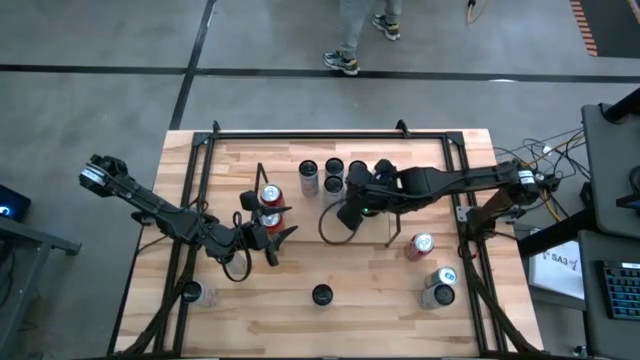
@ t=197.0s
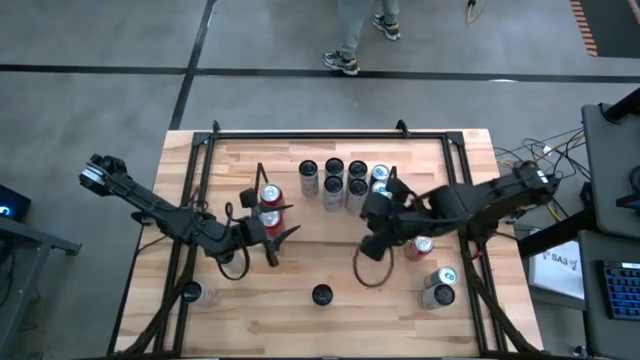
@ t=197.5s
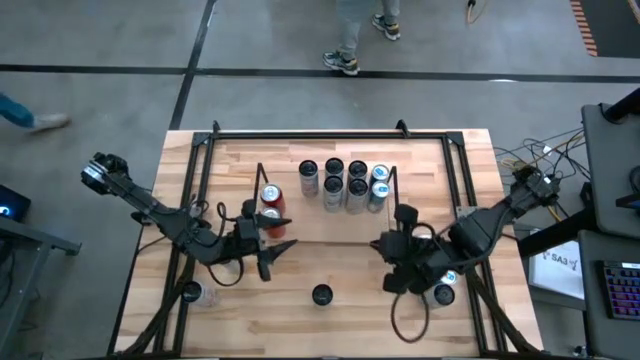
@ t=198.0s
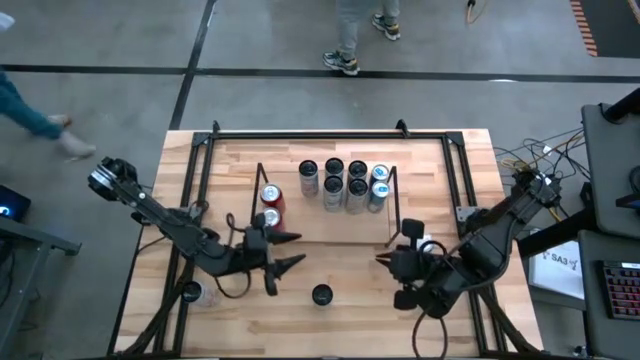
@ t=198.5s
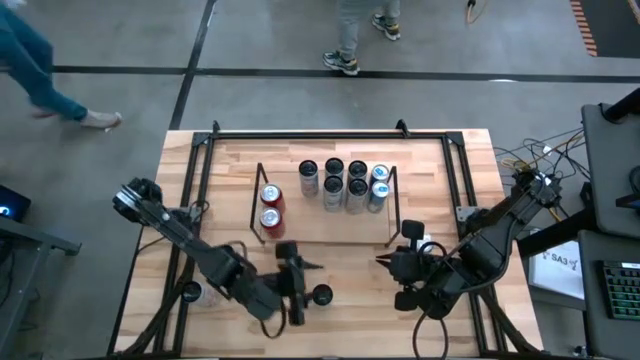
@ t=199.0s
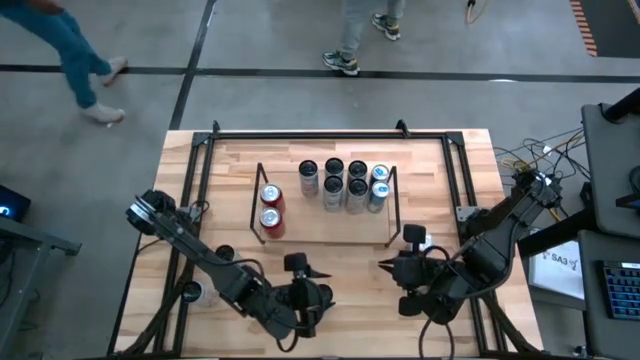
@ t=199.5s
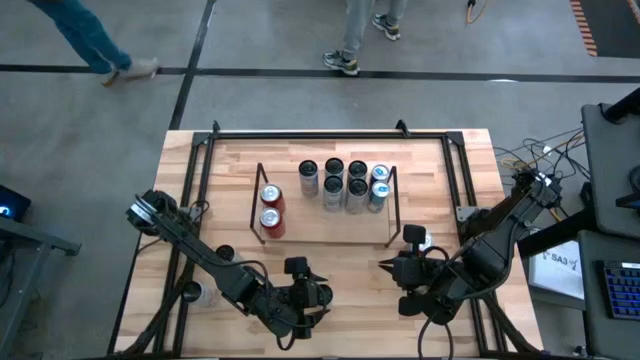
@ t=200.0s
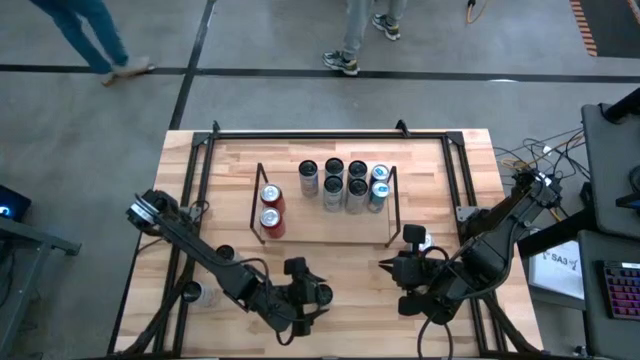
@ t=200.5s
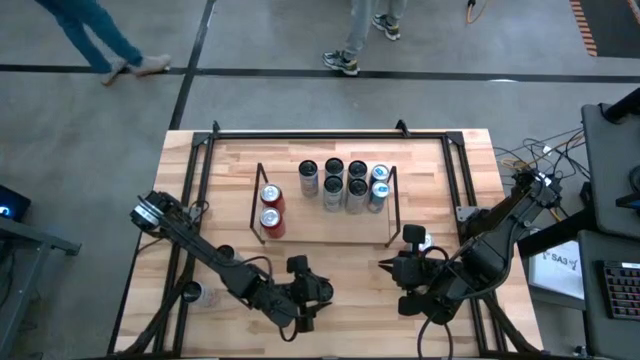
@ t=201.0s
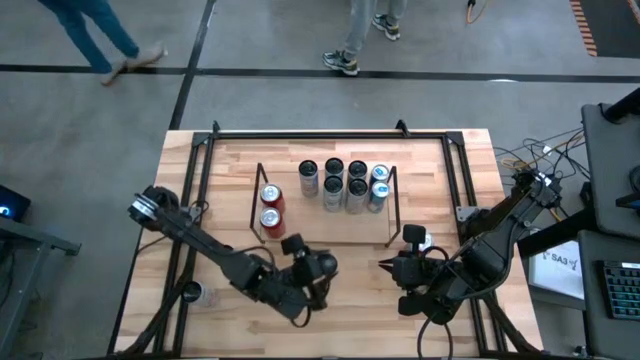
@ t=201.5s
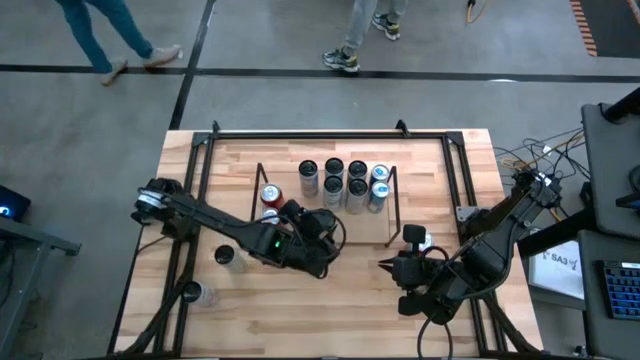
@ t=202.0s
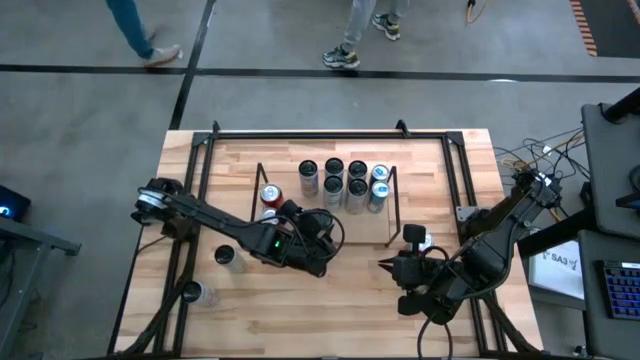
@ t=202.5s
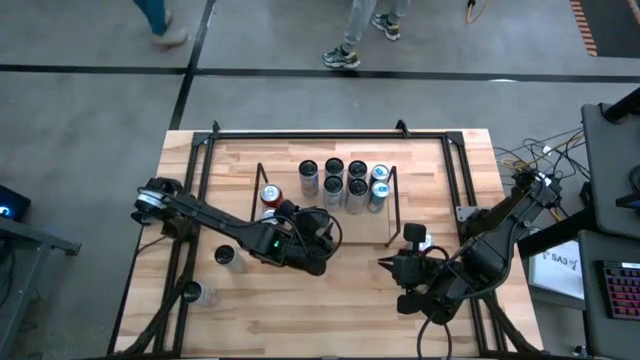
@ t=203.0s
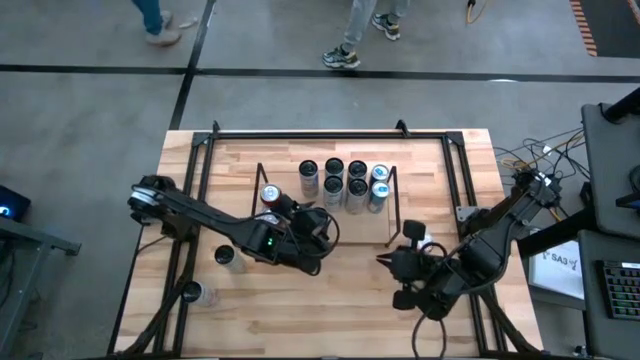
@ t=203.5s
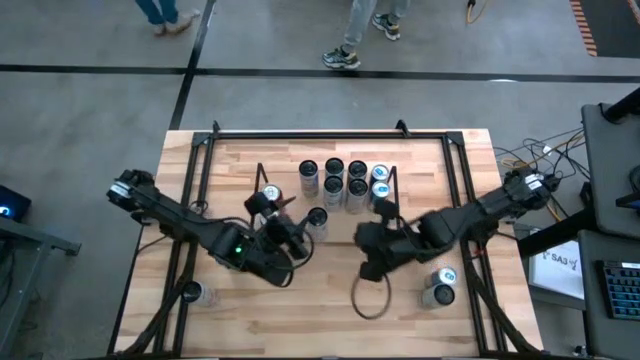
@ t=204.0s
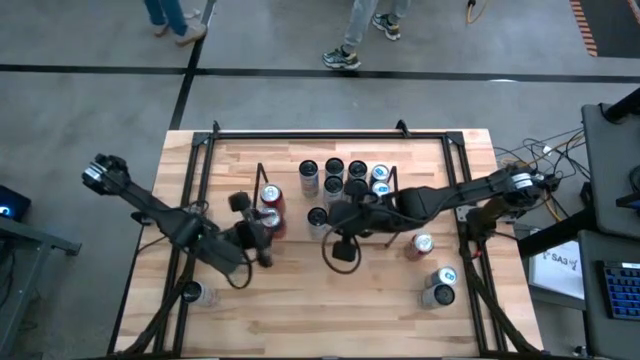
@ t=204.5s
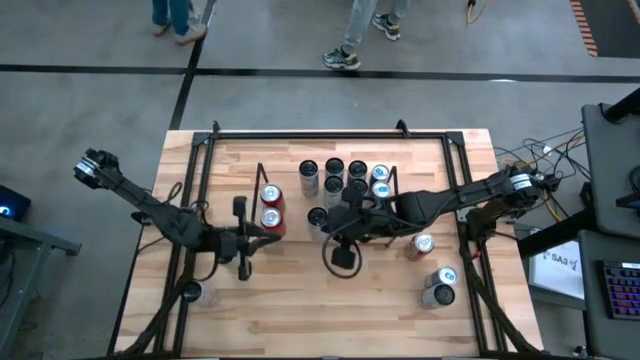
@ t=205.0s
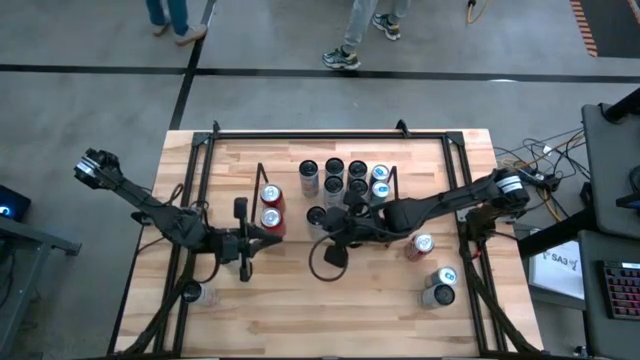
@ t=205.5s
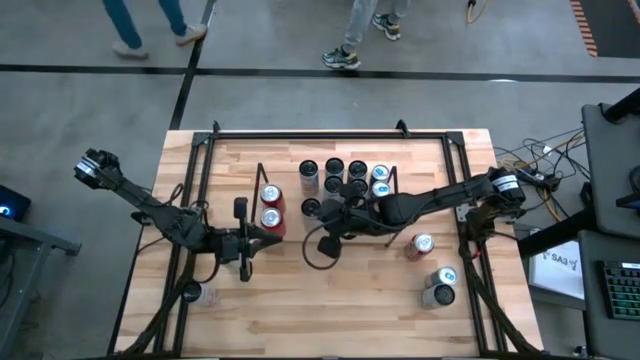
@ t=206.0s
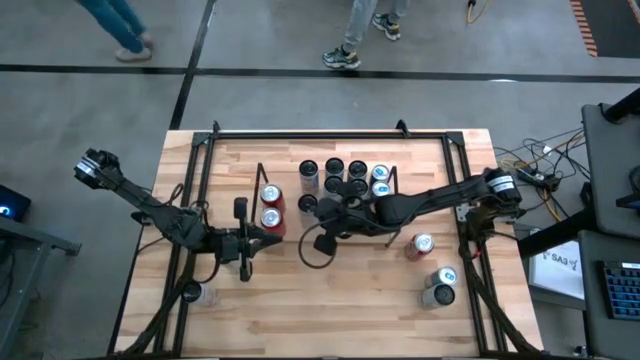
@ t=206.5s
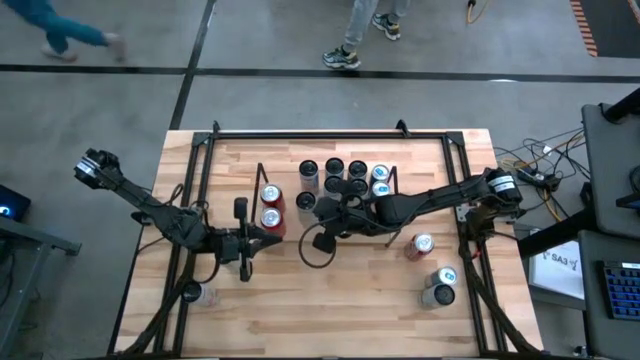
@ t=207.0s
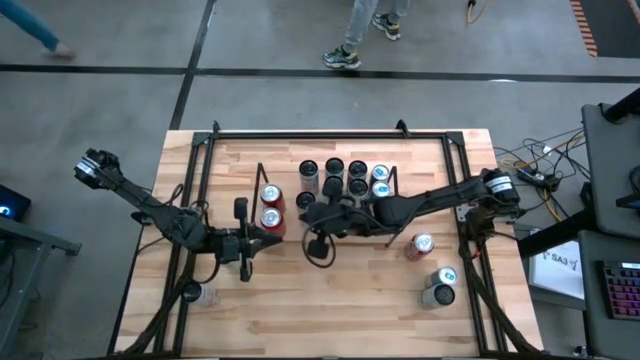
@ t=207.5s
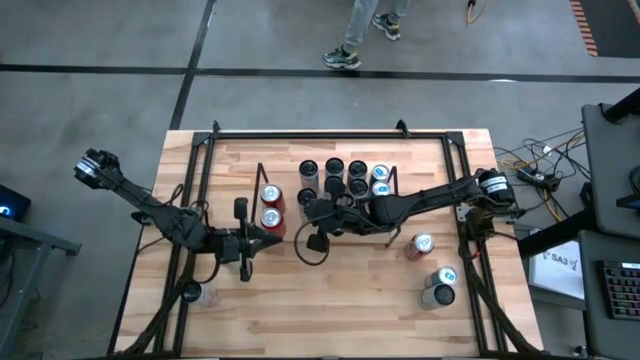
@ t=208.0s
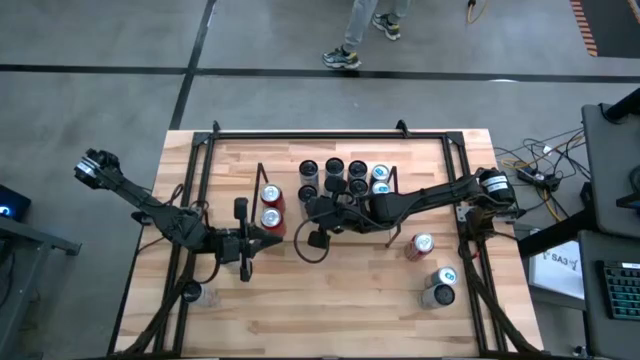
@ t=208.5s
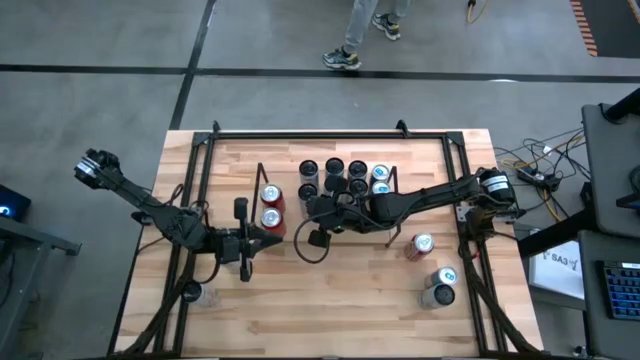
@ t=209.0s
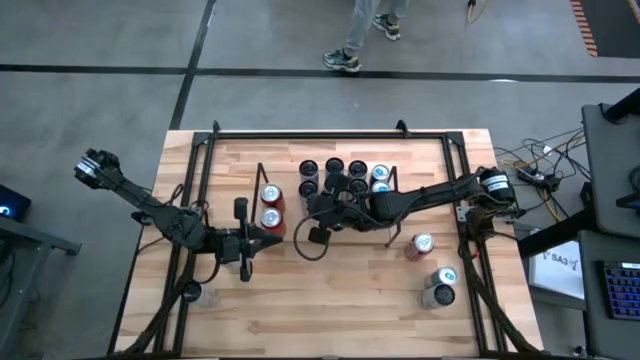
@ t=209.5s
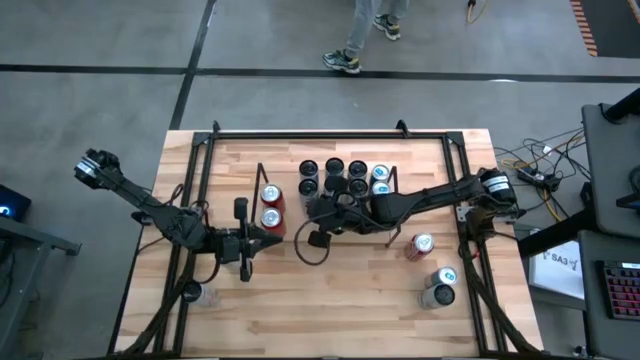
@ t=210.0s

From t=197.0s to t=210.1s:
Task: Place canned beverage on shelf
Put the right white and pink soda can on the shelf aligned with the other white and pink soda can

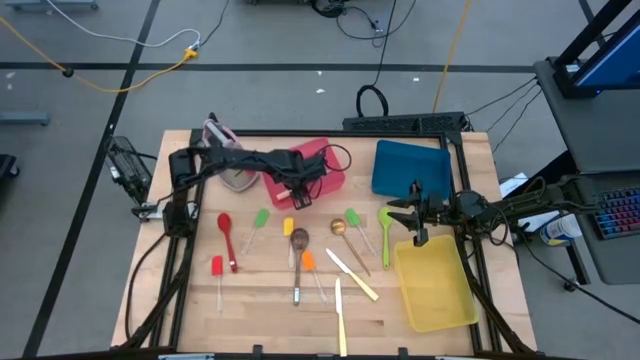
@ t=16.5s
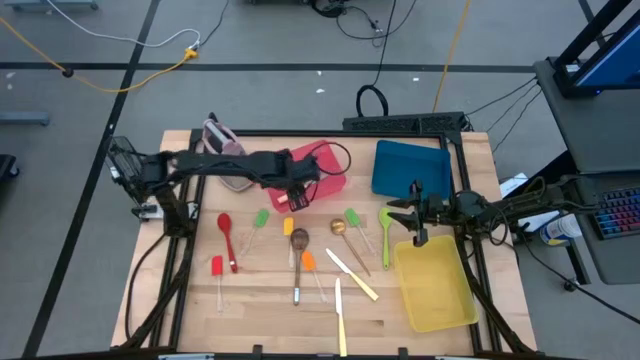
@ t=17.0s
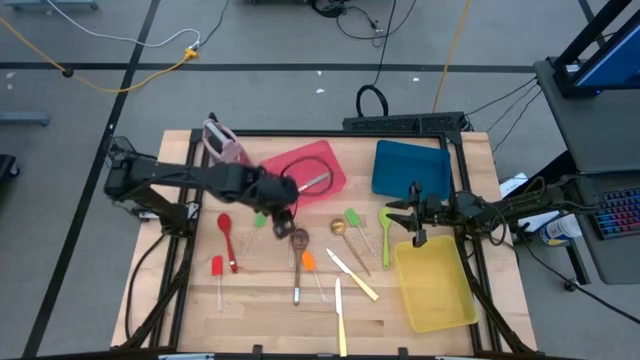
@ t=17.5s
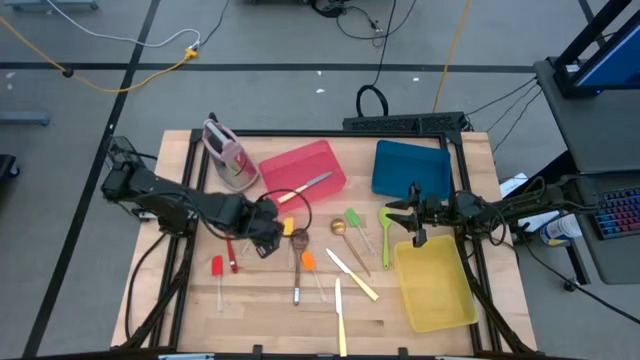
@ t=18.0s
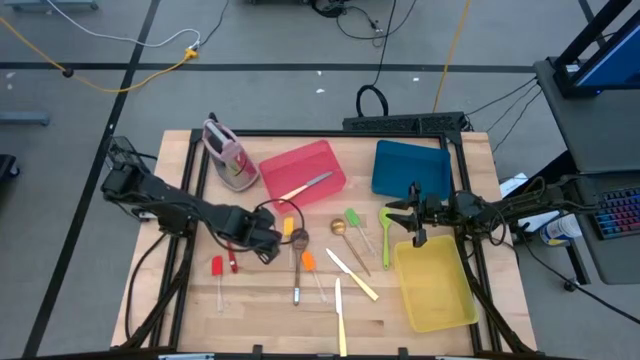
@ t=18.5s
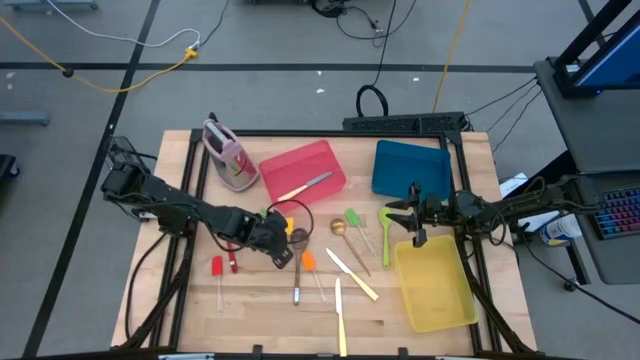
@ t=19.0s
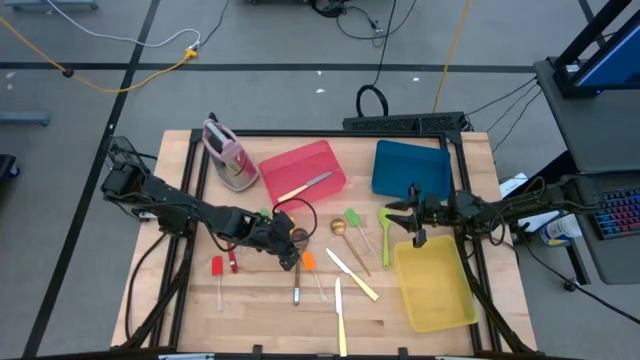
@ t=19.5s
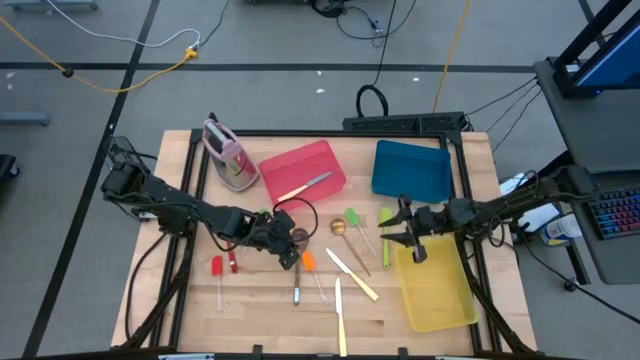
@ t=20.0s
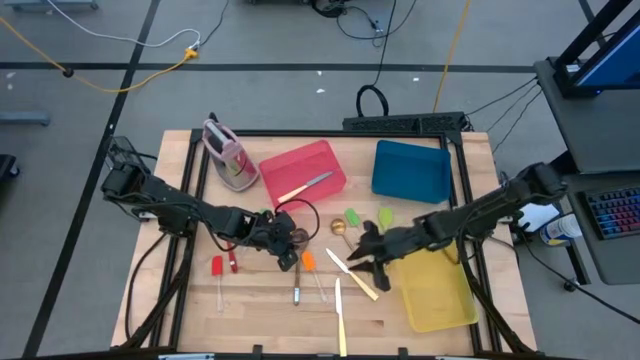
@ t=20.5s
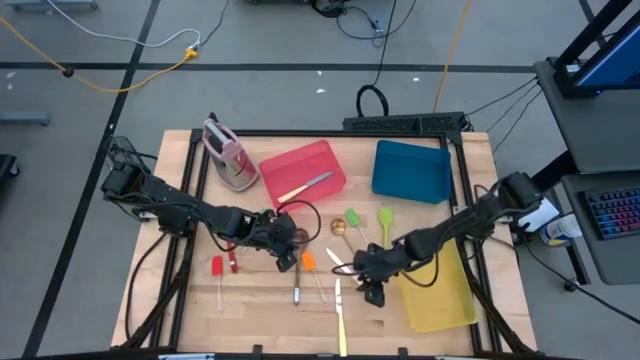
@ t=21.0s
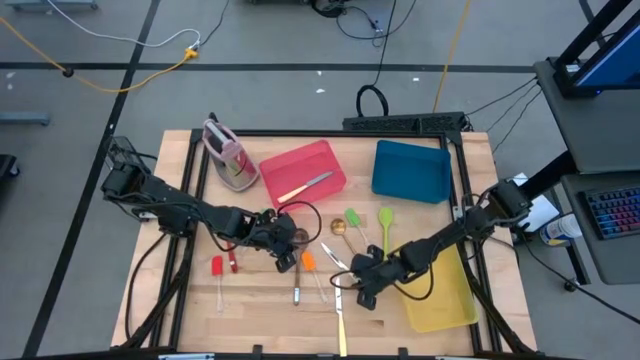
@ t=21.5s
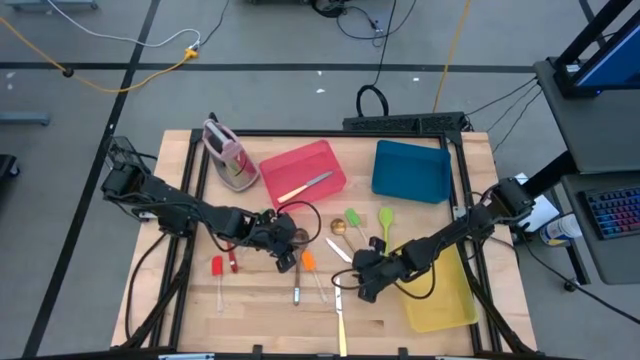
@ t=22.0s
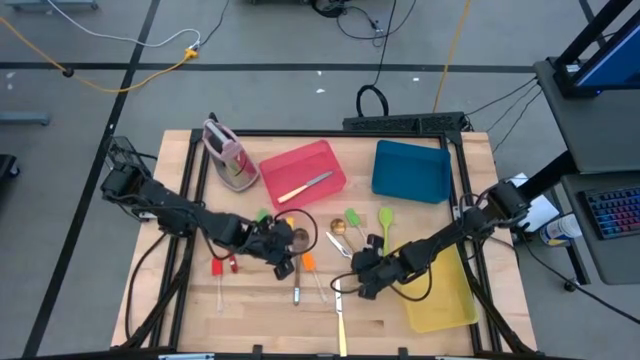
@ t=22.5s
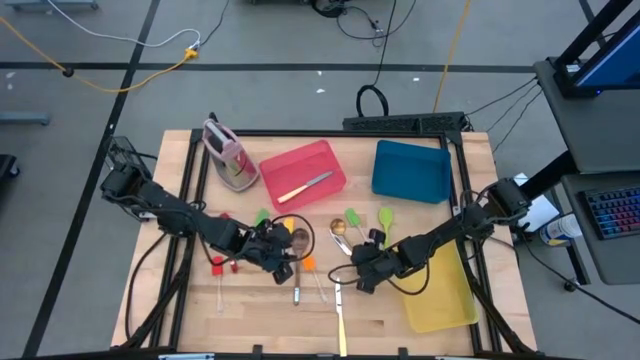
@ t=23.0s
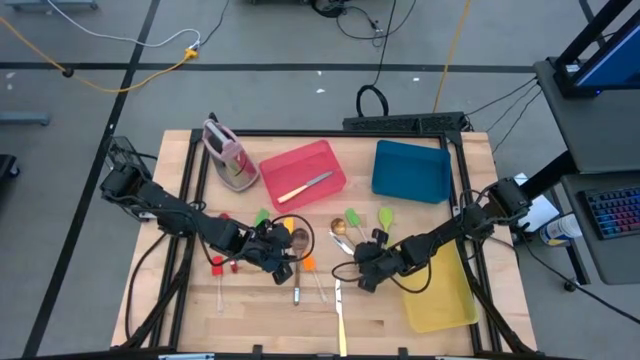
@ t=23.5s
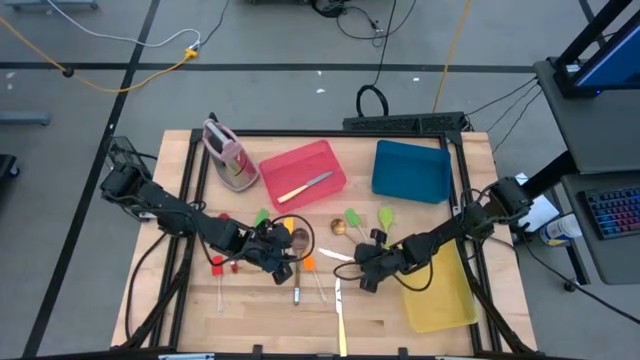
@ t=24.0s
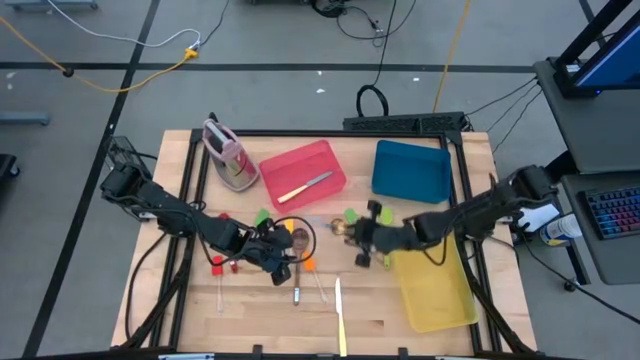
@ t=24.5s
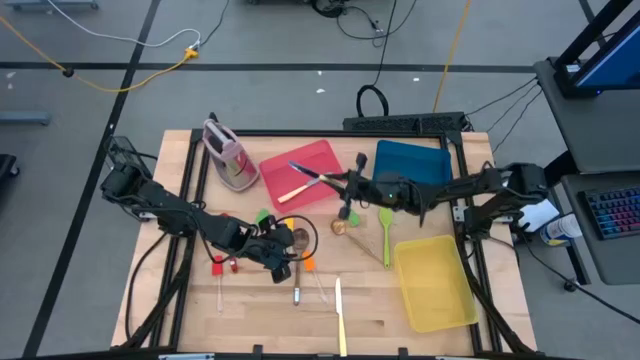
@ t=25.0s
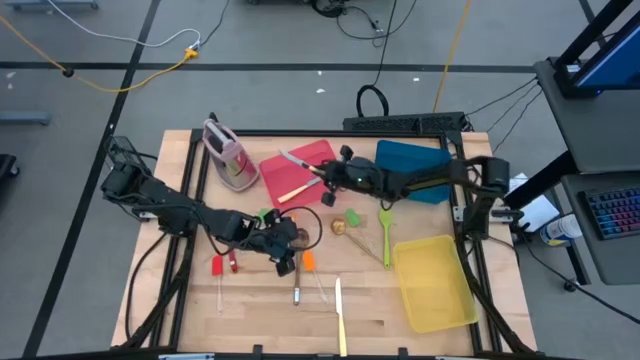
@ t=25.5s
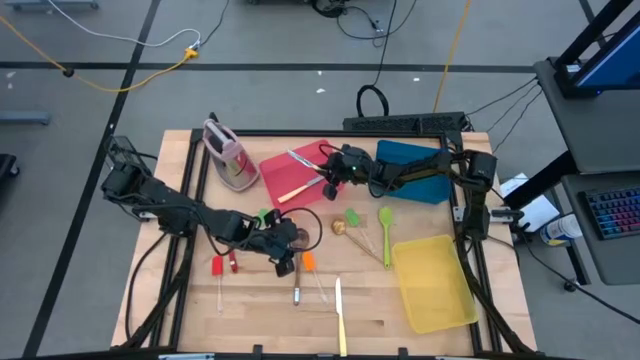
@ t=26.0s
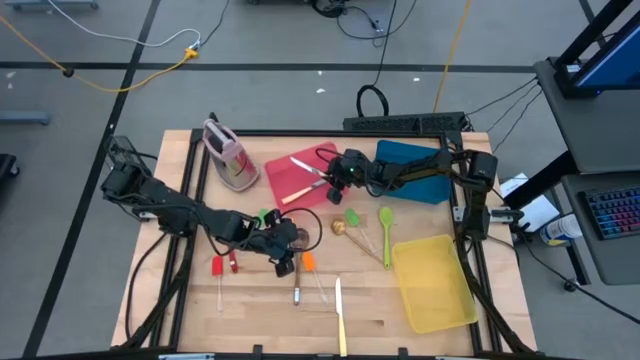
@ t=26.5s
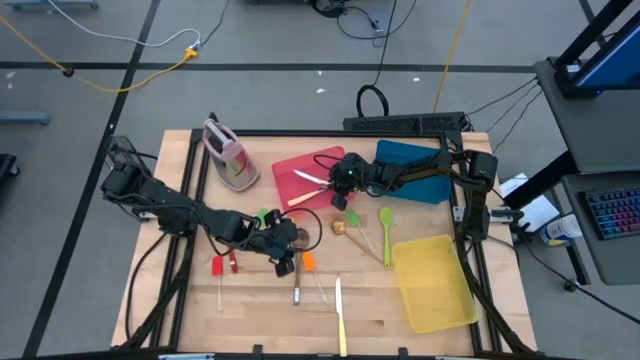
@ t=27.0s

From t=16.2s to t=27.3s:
Task: Pick & Place Kitchen Items
Put the yellow knife into the pink bin
